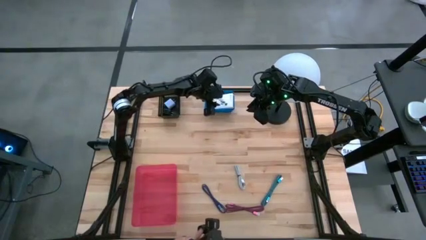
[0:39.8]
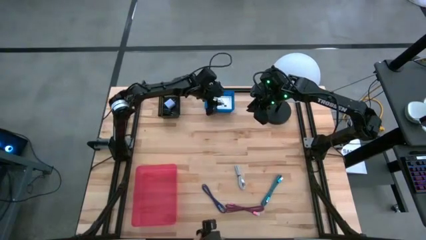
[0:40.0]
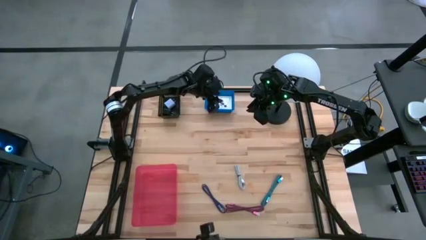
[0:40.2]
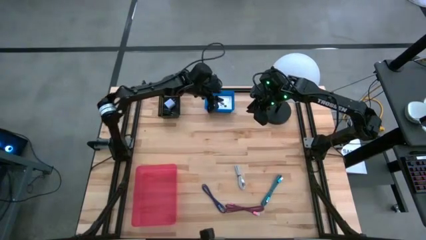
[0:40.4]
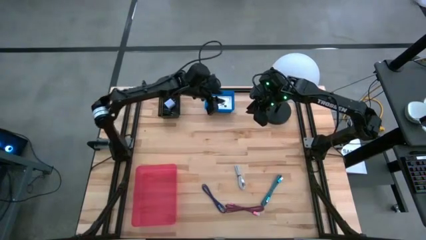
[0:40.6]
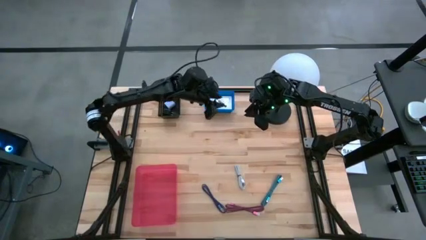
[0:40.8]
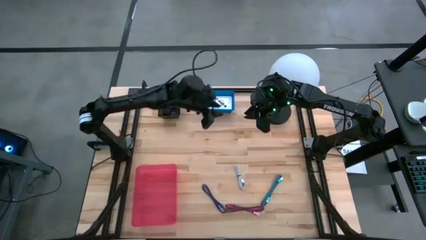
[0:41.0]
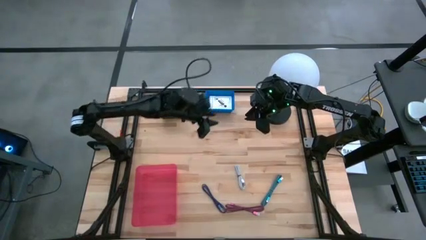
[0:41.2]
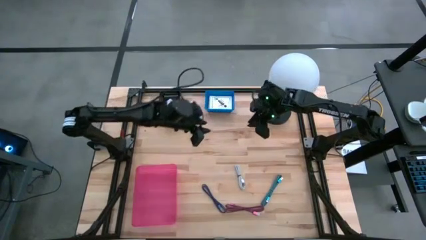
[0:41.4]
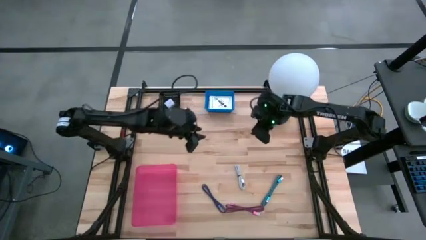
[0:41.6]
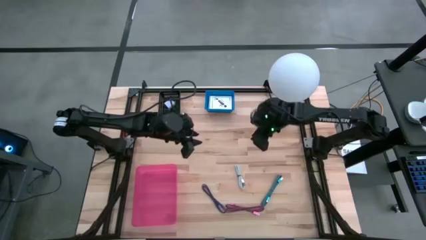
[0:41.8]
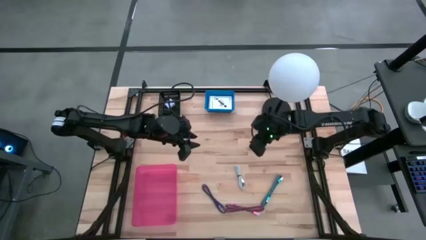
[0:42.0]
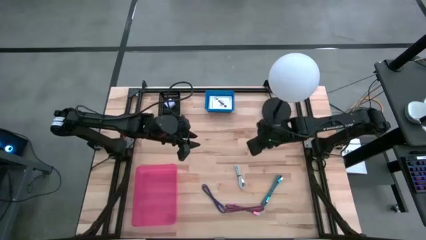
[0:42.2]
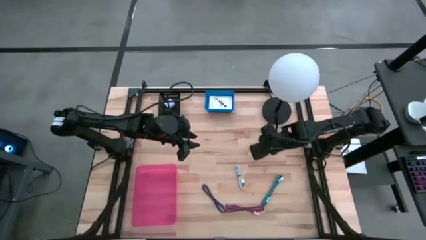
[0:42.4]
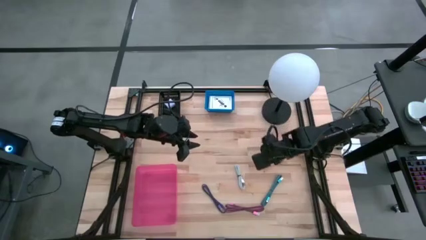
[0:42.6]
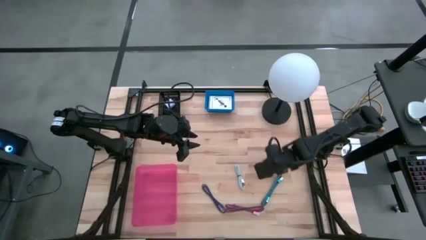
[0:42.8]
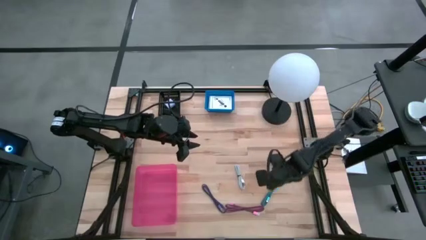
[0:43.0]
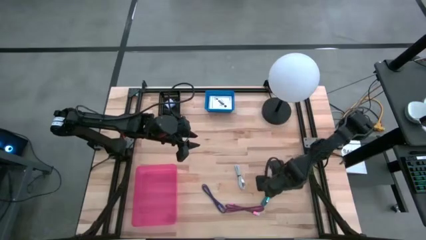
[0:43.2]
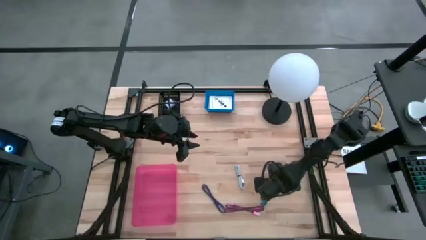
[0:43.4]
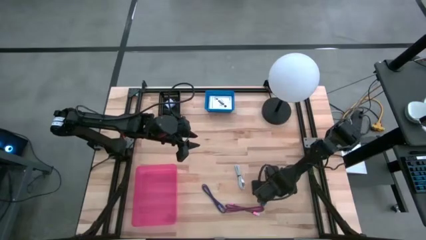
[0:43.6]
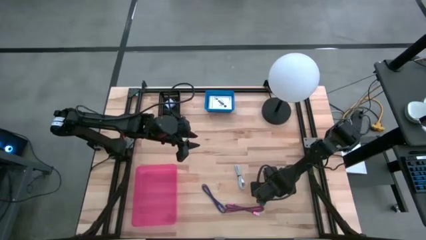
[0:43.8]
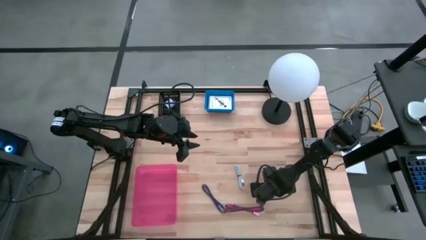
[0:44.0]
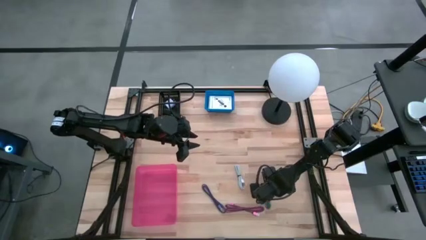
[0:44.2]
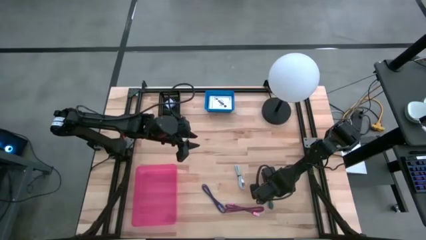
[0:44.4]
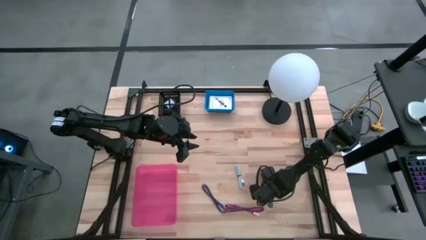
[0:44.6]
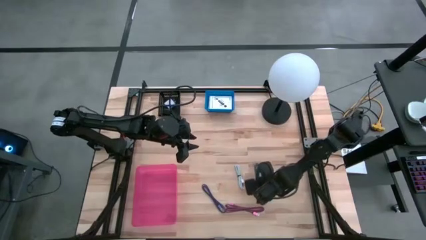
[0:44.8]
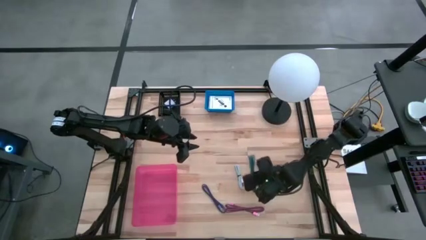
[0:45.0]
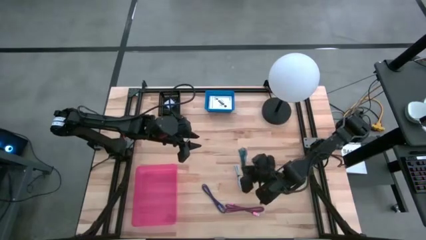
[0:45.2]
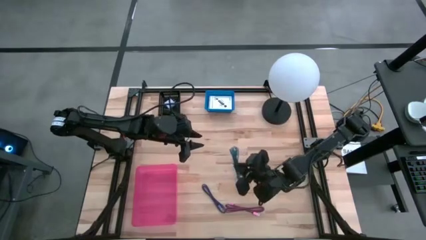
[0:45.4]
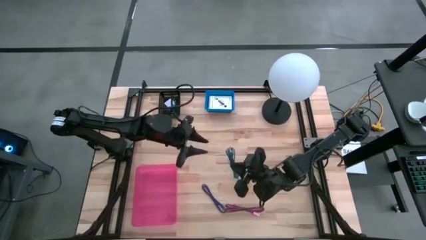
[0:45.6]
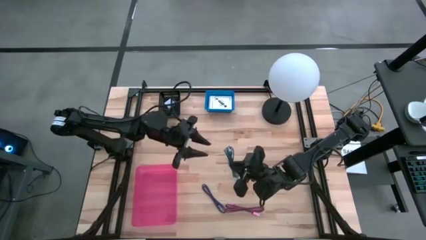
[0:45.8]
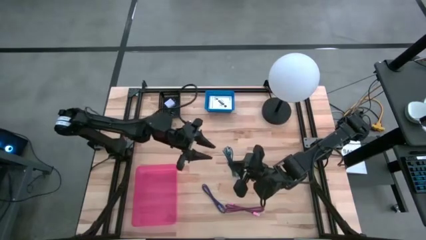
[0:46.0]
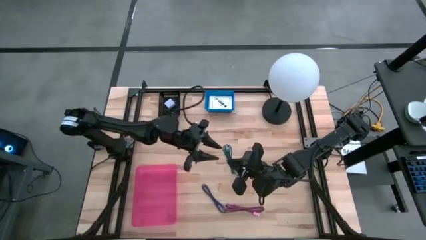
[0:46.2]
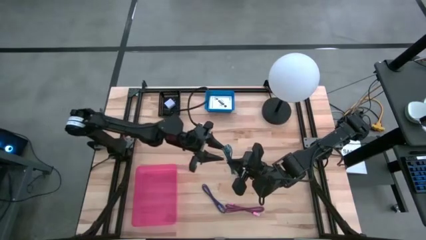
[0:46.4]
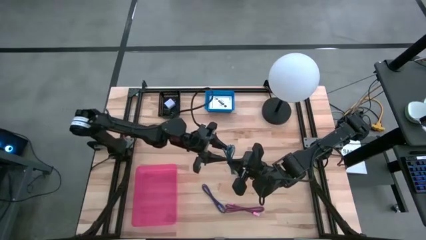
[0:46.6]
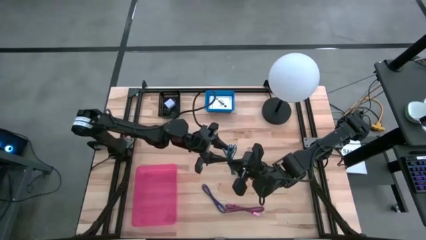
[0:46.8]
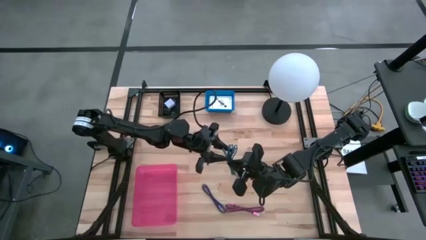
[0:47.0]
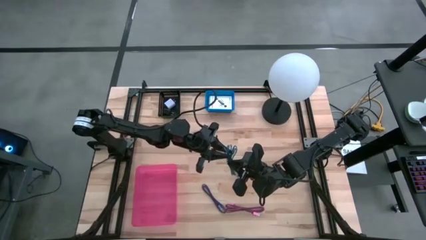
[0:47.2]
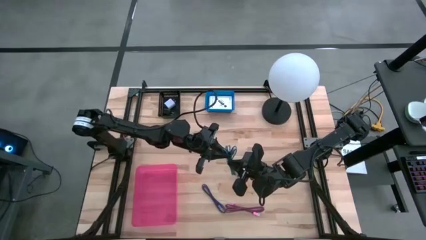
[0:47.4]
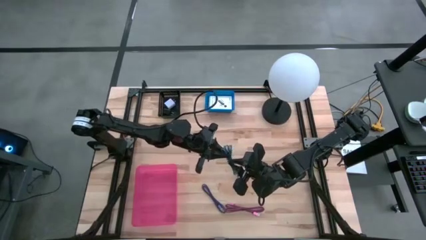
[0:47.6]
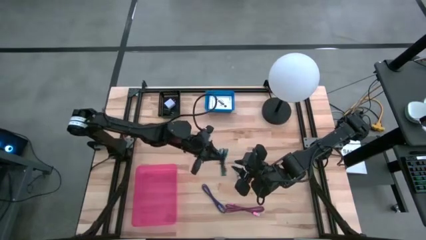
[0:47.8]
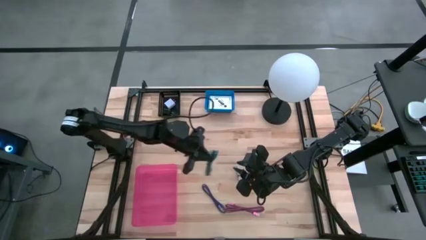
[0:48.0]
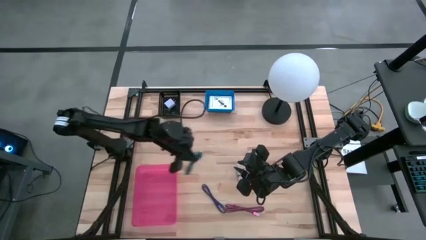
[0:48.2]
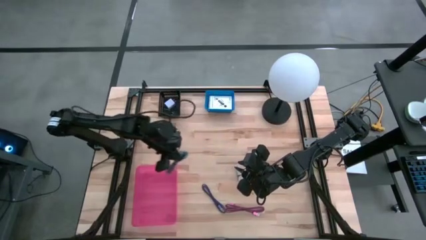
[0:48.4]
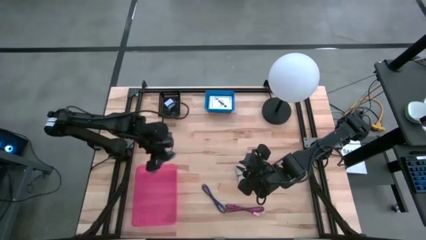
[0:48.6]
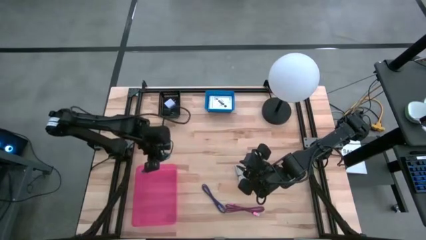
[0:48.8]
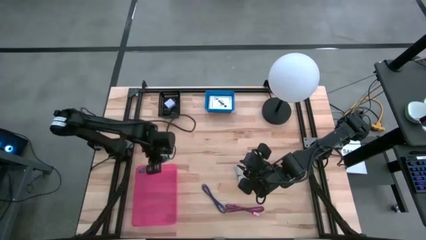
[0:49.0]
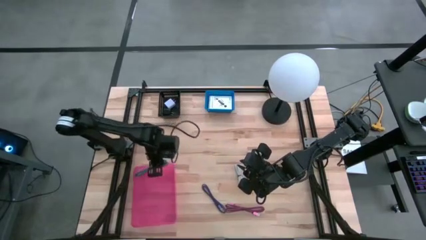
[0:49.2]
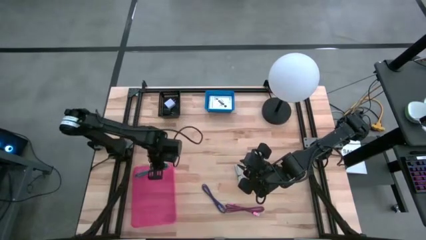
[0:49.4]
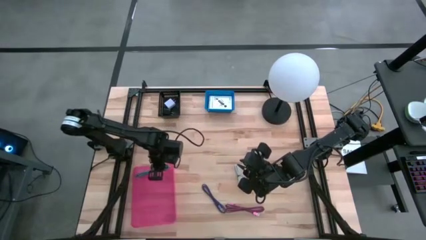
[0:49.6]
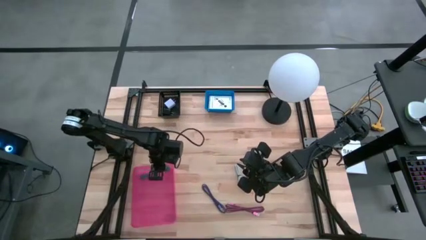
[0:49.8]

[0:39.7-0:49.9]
Task: Pick and place items into bin
Put the light blue tied charger cable into the red bin

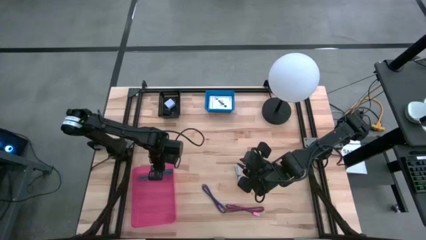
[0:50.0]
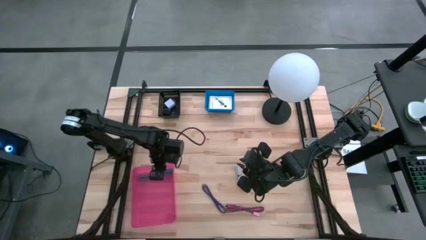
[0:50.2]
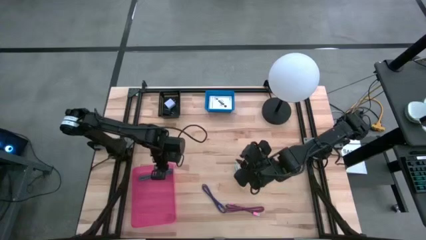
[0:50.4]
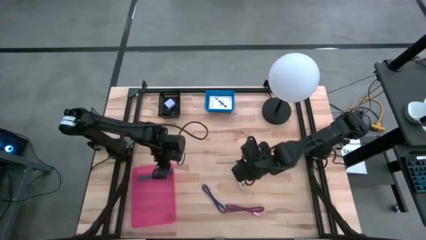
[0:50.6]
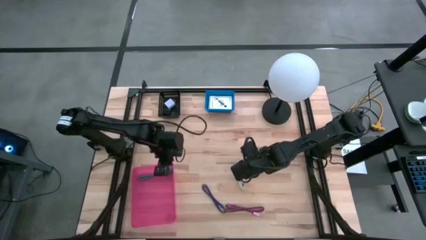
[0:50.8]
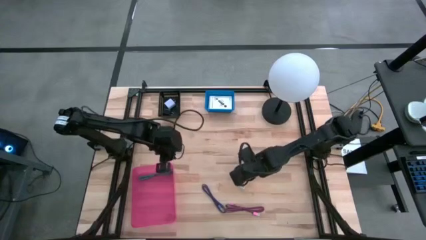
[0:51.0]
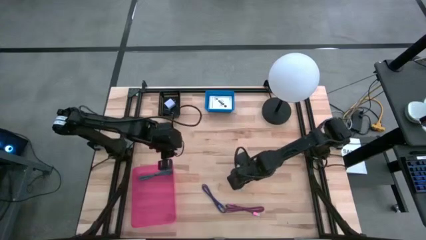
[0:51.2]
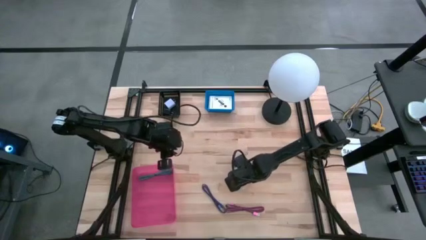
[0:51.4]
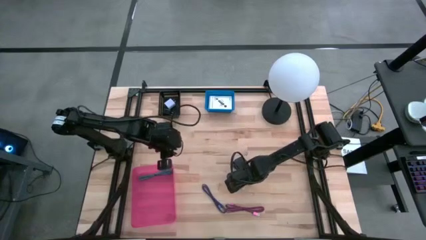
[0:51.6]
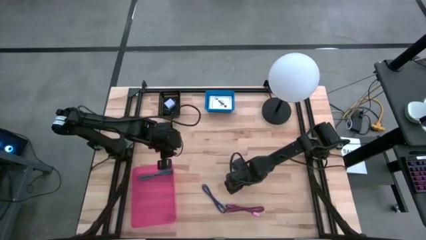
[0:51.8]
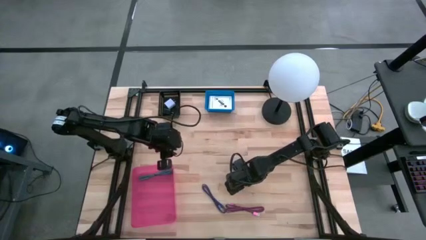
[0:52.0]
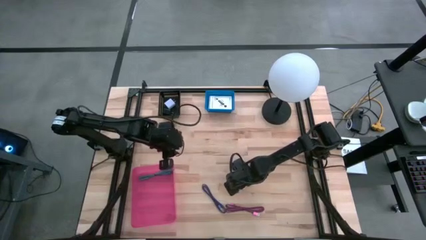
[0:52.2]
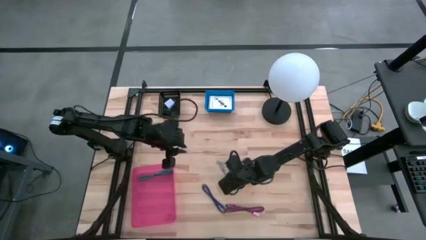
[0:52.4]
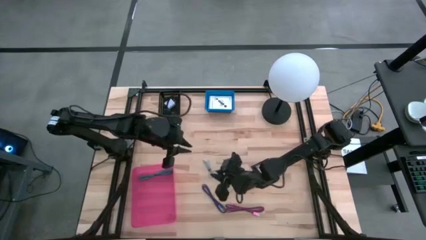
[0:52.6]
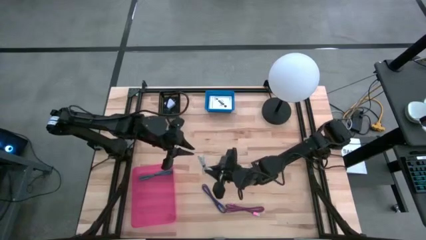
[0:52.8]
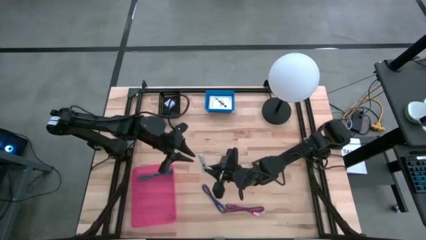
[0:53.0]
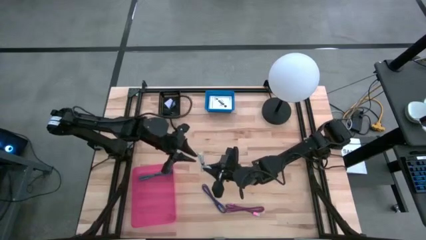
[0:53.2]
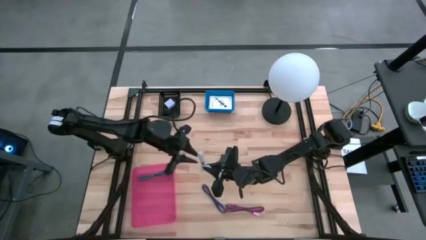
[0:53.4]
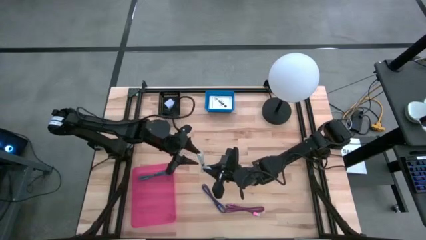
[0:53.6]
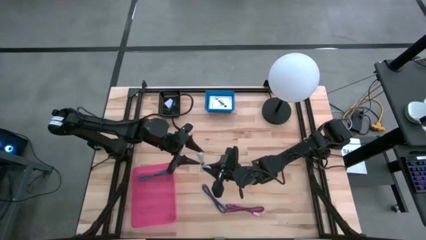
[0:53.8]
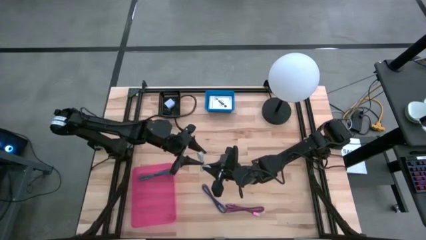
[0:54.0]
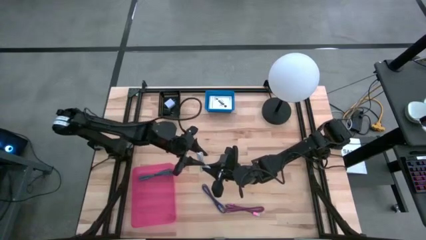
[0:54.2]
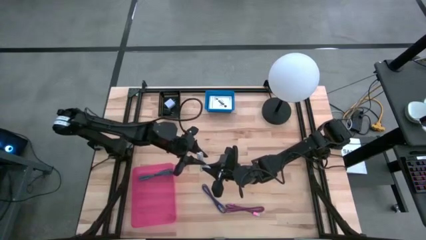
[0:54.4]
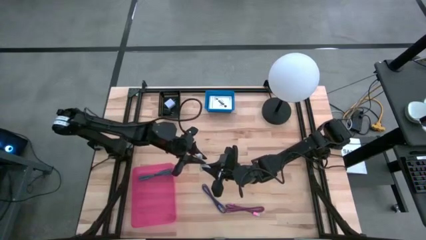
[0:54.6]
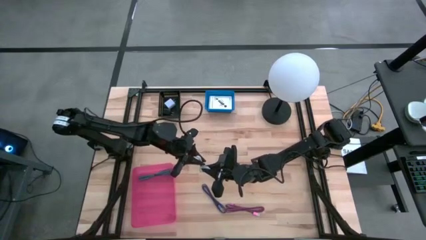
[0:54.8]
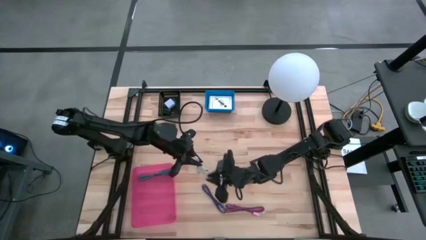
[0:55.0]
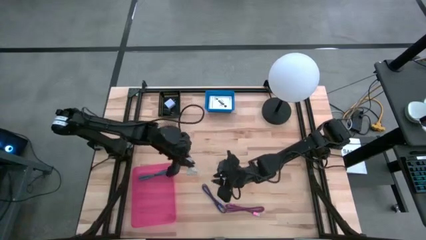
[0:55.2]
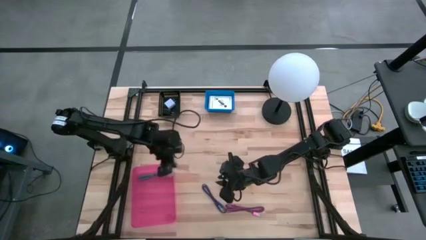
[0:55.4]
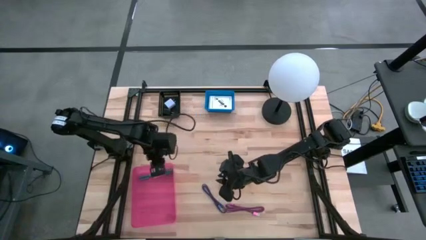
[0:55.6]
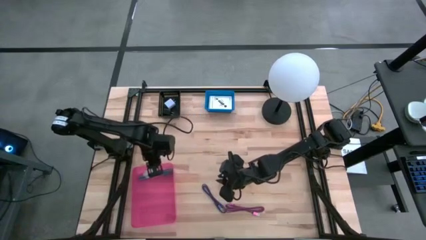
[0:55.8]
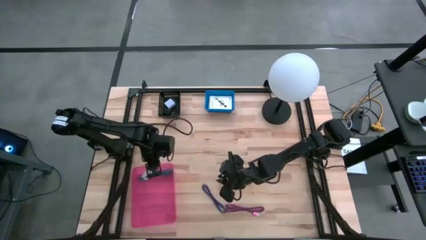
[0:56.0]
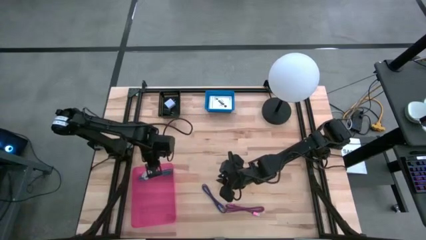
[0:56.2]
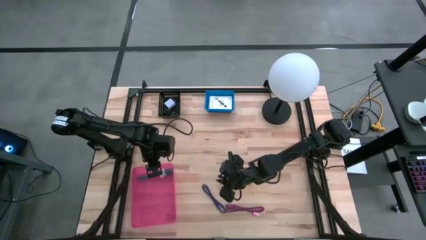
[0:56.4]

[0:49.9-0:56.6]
Put the white tied charger cable into the red bin
